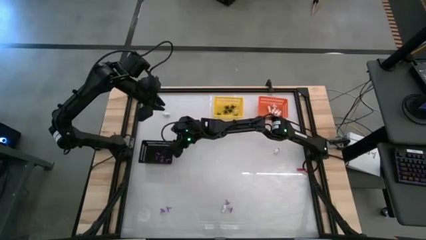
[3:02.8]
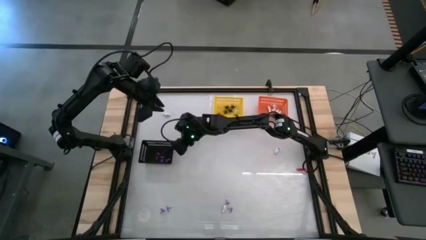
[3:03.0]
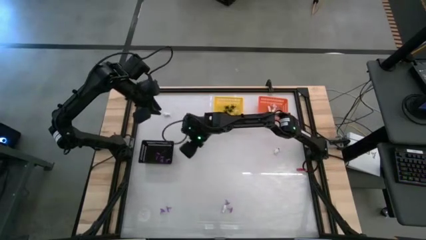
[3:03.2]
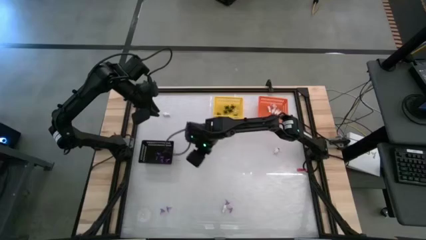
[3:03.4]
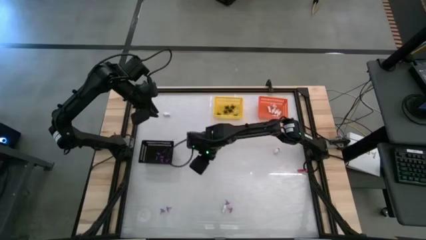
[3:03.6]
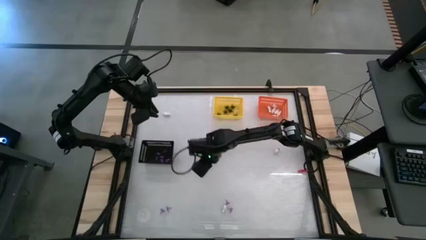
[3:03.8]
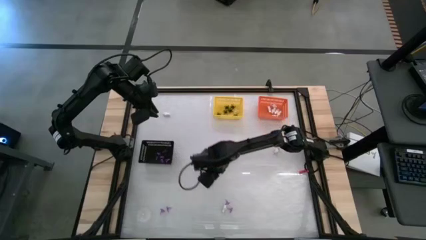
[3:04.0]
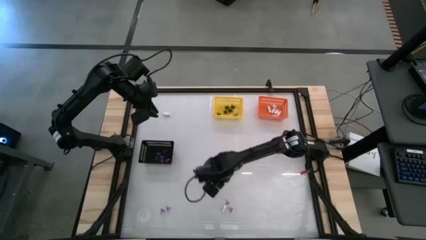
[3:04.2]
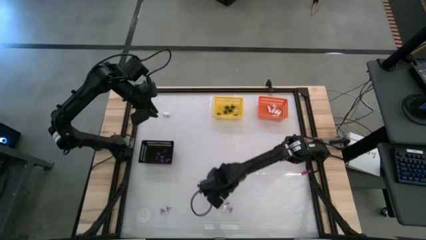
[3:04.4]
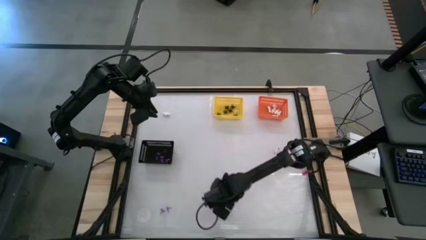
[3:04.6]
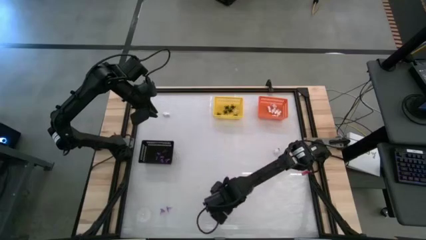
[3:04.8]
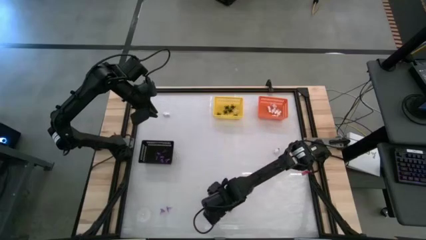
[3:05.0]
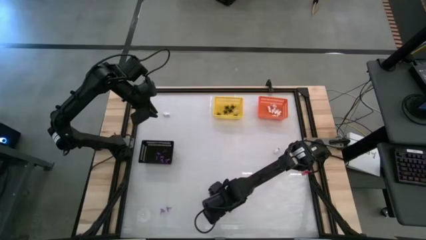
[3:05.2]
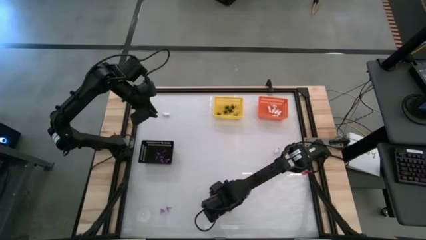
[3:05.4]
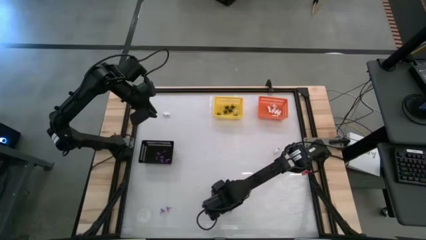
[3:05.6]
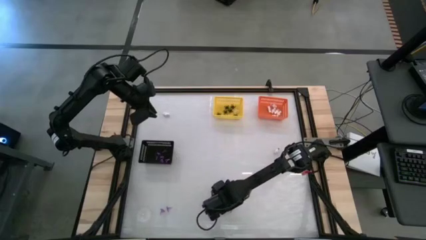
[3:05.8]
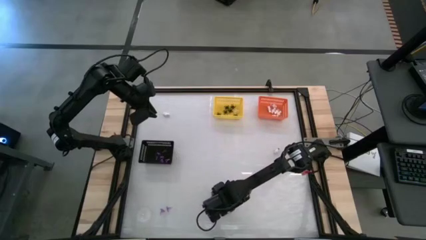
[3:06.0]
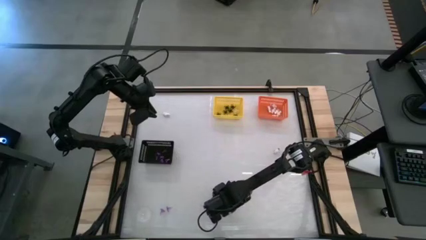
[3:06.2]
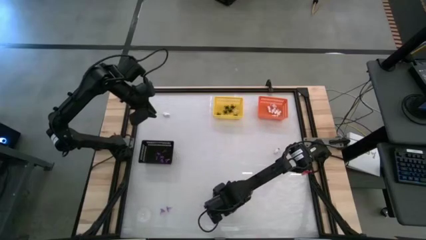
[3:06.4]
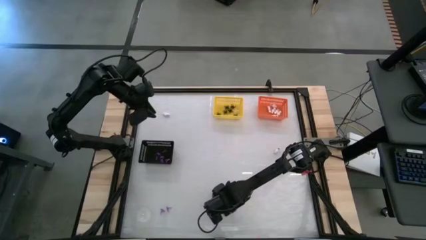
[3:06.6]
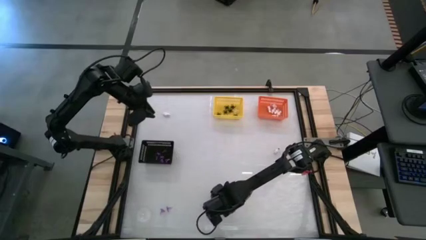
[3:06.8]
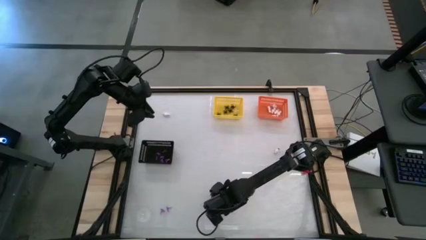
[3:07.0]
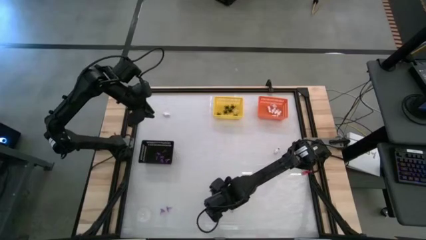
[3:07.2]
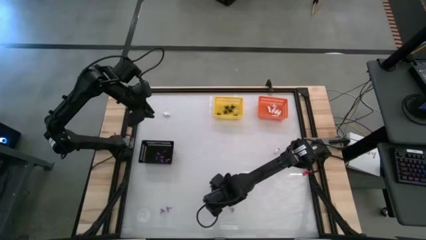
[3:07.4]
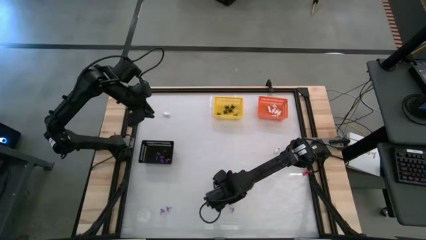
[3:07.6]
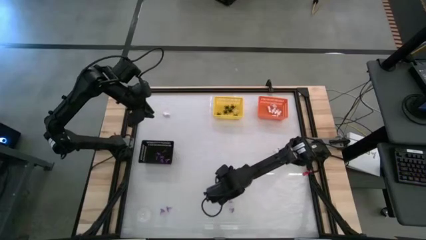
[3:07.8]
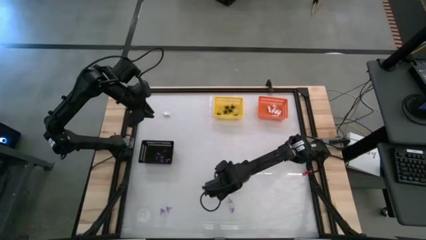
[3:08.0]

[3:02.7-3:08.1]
Task: Sort Halloween decoration
Put the white skeleton toy into the orange bin

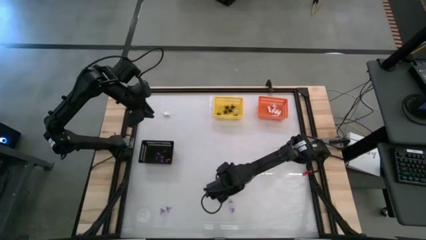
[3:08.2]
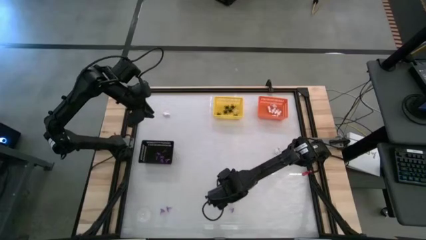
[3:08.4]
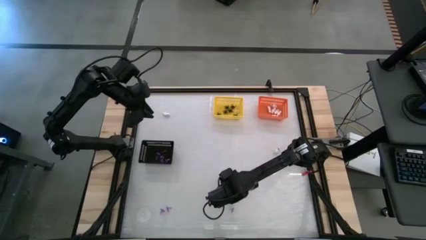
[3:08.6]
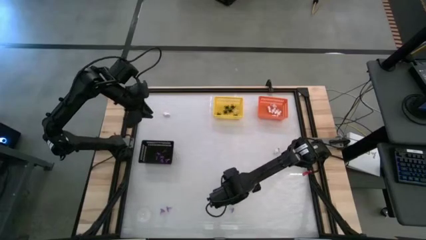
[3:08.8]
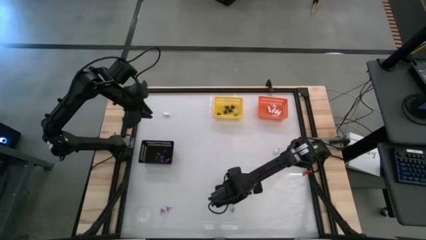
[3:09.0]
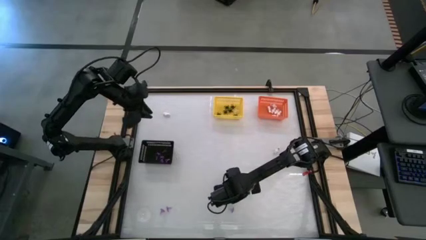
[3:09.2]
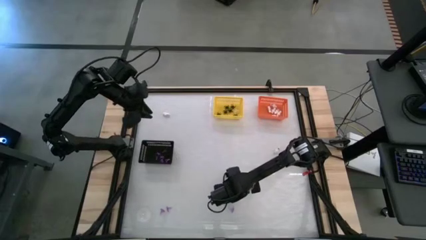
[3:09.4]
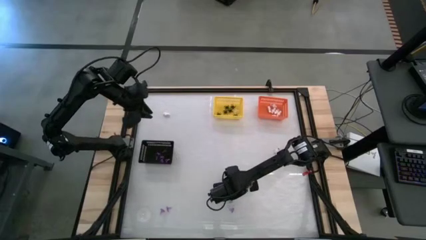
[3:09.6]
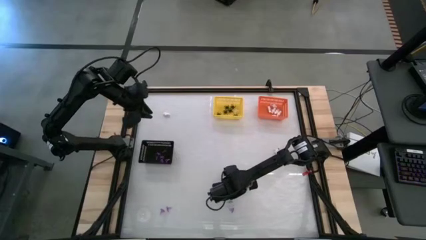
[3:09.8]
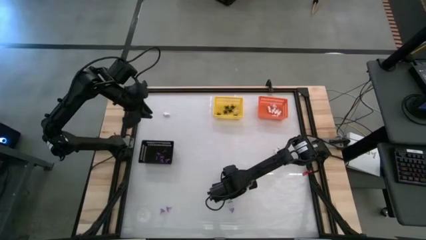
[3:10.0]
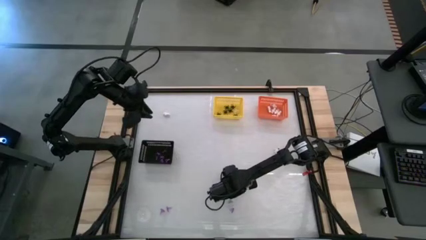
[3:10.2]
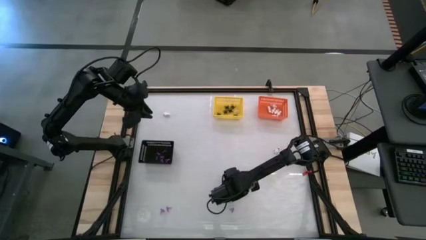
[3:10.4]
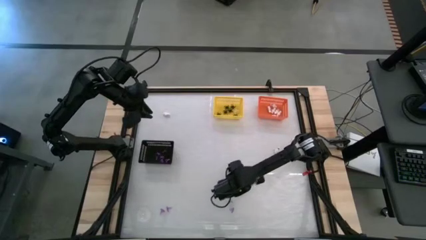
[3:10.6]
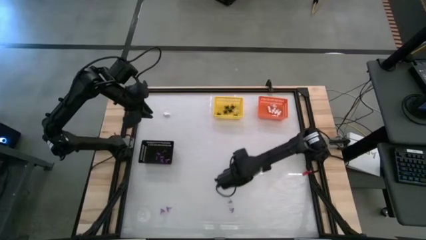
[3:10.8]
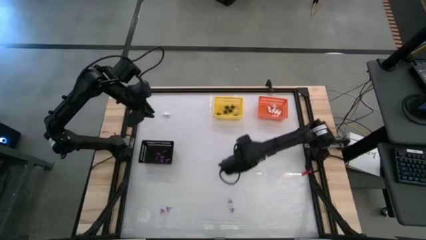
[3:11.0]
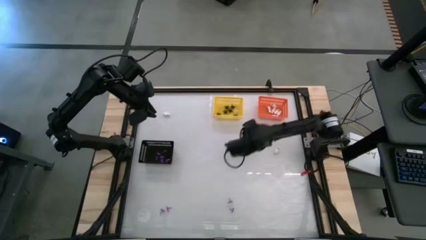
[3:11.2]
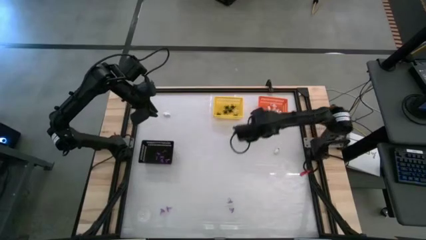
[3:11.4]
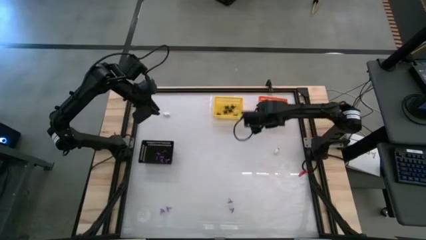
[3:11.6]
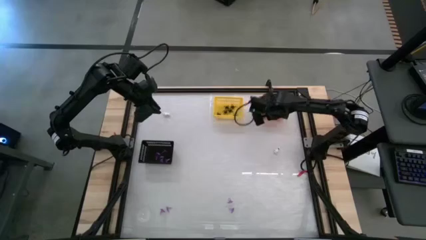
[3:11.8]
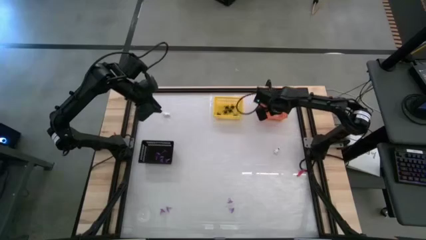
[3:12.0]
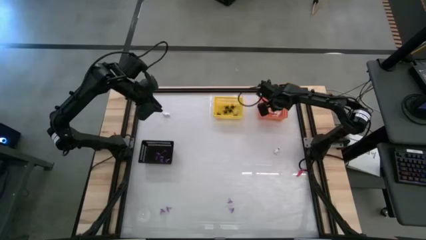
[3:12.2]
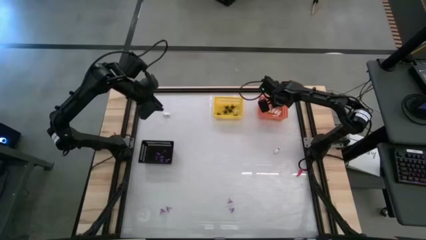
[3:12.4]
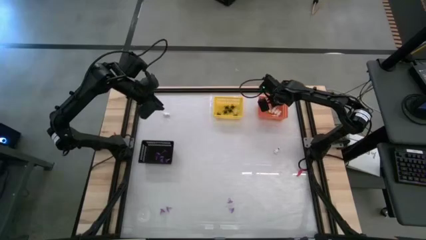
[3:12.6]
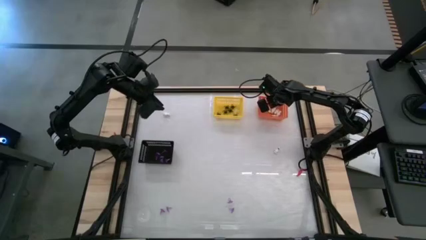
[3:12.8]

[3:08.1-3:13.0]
Put the white skeleton toy into the orange bin

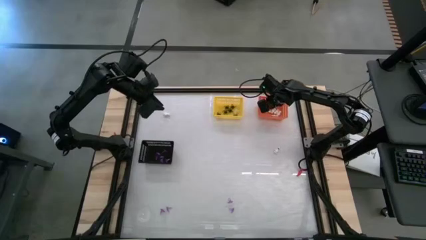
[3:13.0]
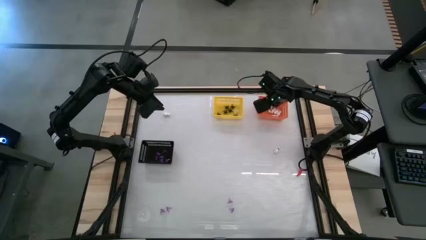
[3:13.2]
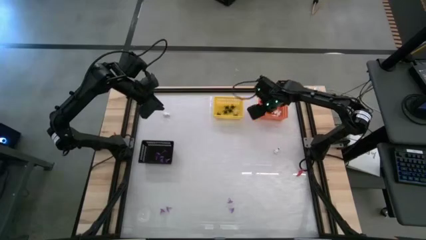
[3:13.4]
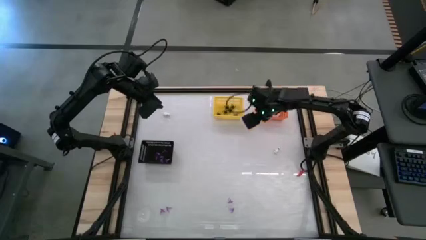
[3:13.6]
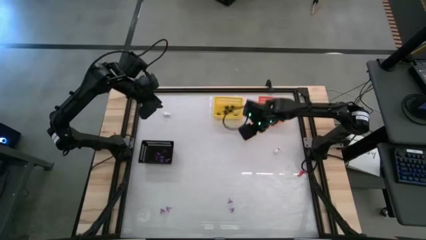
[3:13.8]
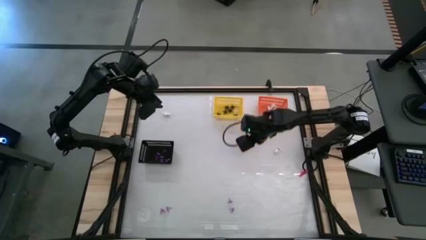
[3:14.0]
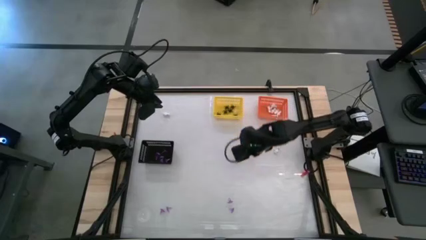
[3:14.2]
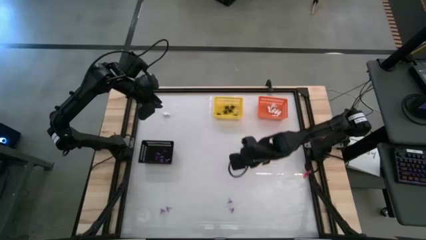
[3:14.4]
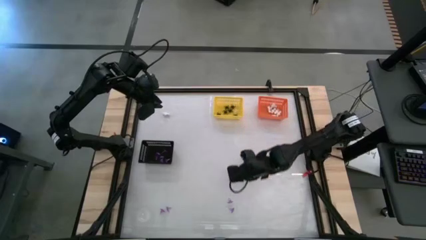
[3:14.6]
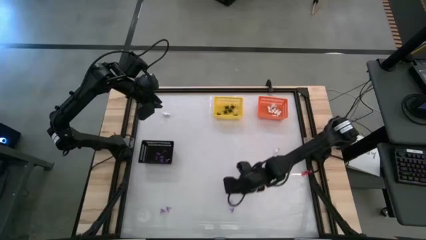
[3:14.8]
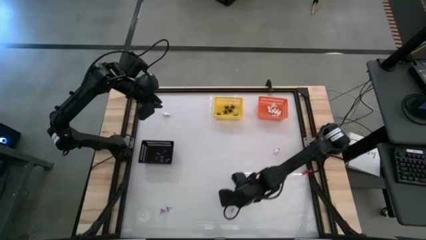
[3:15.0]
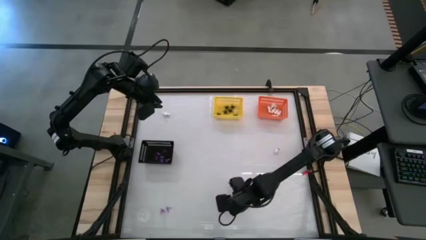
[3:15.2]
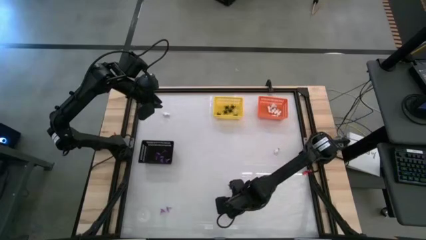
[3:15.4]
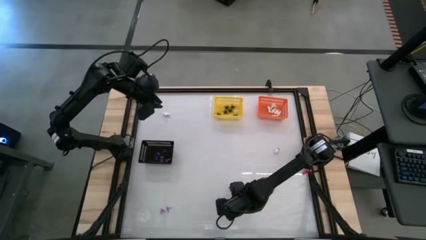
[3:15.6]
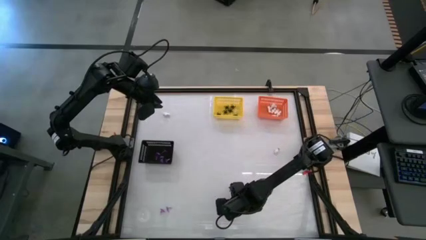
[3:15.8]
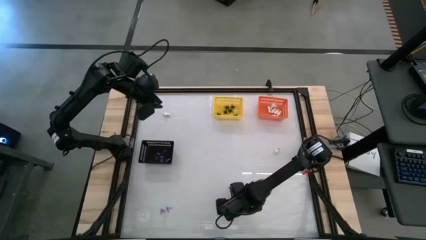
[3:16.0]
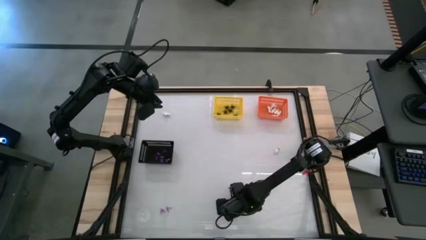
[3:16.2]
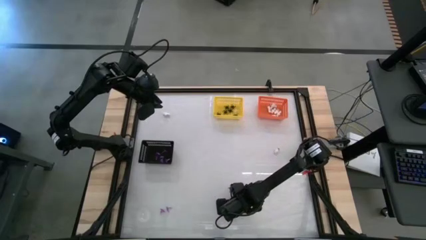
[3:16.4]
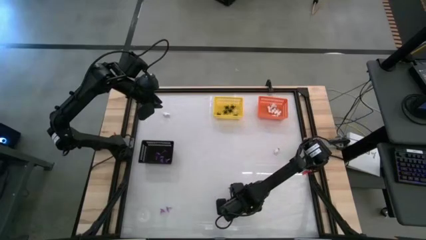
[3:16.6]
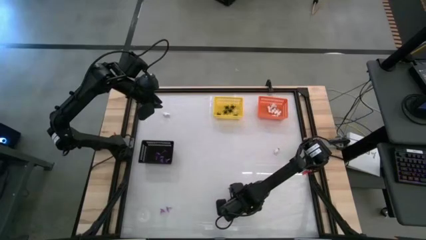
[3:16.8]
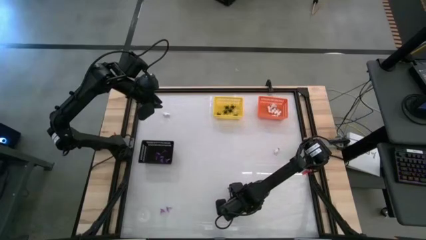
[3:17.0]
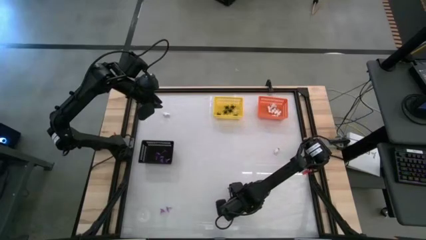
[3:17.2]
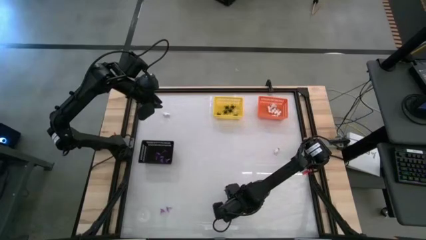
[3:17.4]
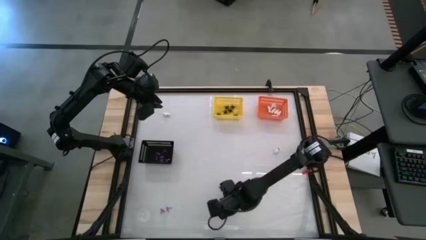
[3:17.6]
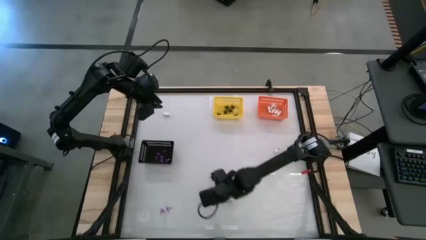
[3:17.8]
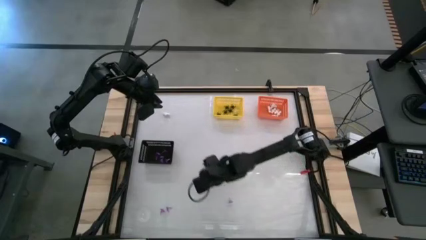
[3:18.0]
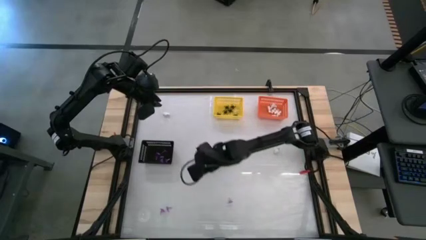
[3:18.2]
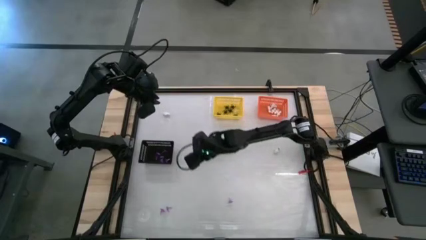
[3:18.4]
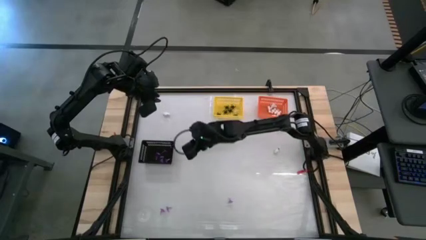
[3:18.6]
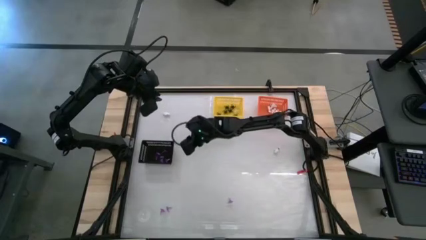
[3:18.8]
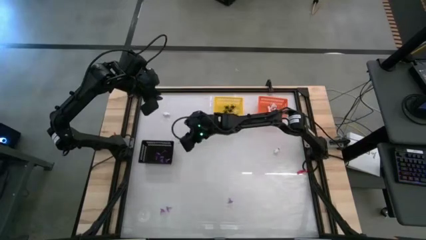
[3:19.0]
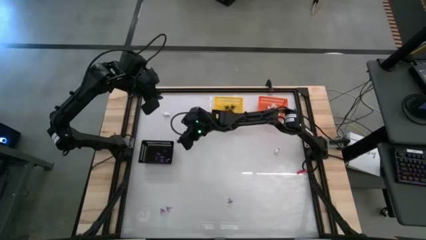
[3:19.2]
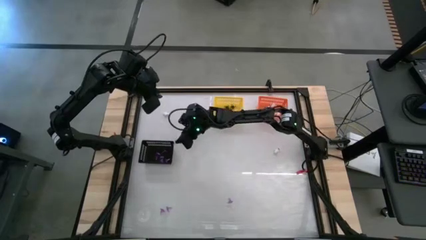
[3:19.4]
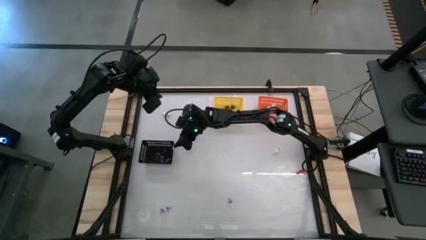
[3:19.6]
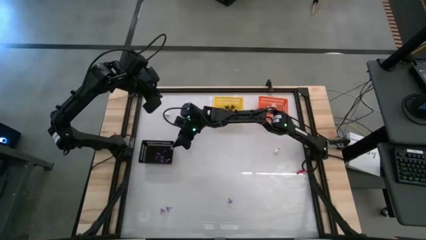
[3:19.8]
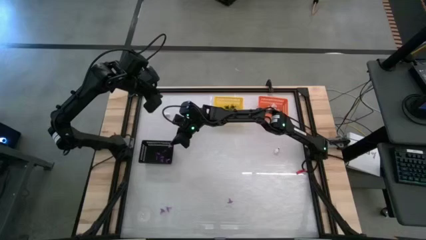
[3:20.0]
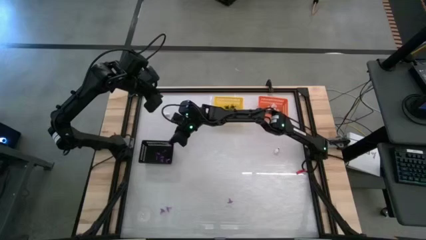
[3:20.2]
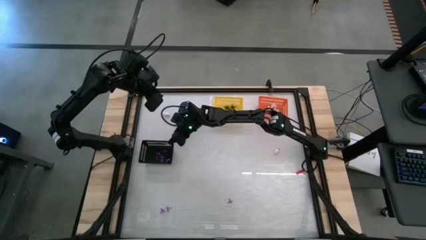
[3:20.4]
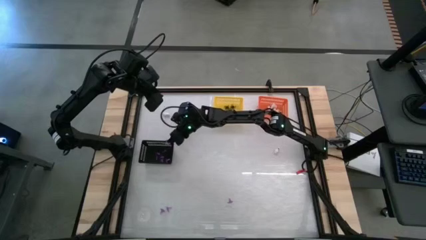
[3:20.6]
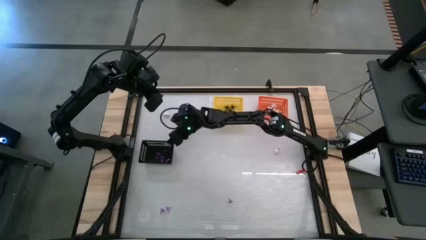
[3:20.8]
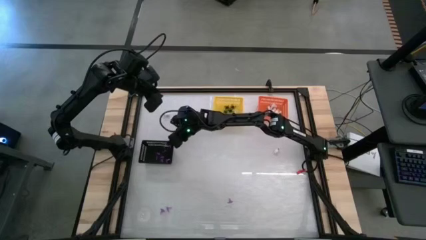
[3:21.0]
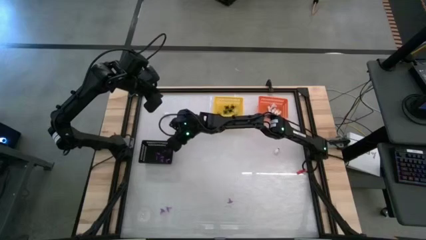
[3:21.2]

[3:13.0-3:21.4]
Put the purple witch hat toy into the black bin
